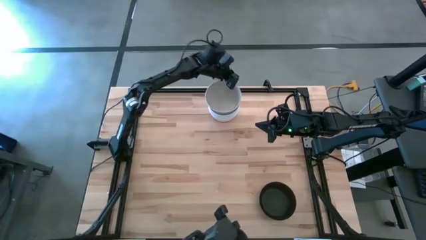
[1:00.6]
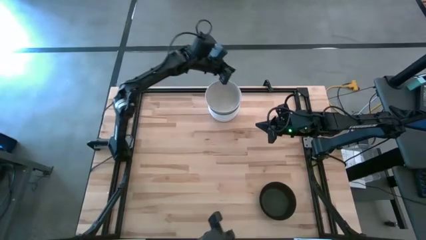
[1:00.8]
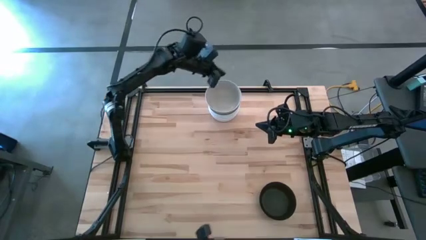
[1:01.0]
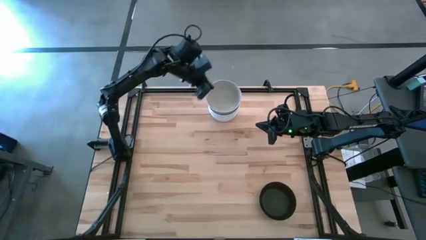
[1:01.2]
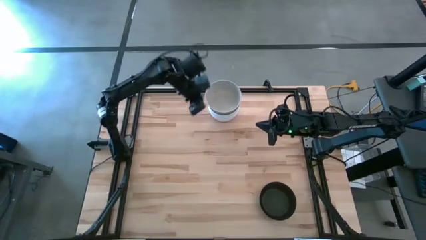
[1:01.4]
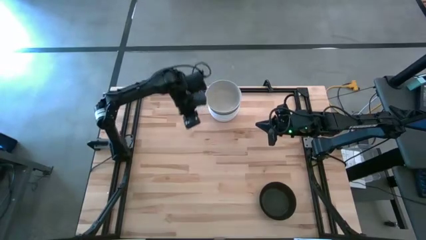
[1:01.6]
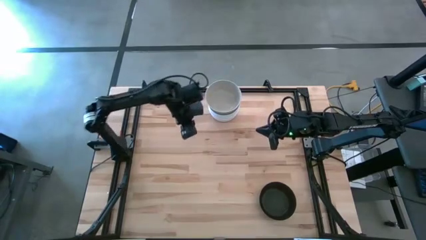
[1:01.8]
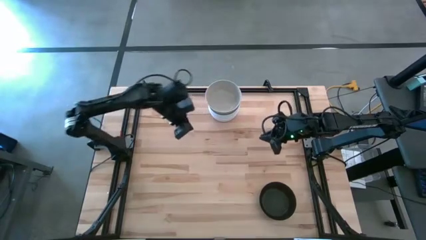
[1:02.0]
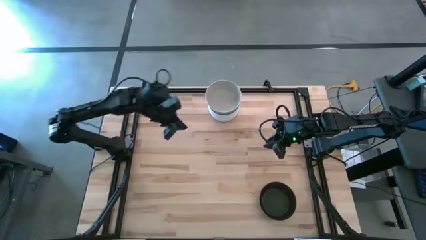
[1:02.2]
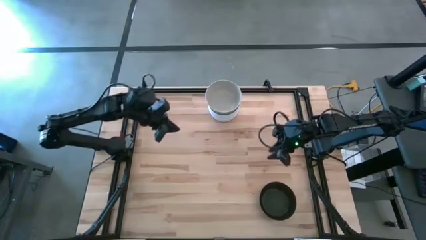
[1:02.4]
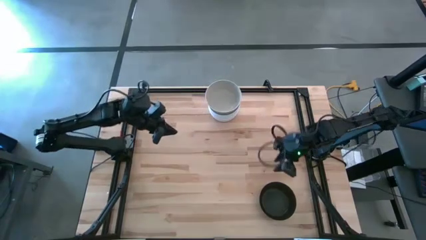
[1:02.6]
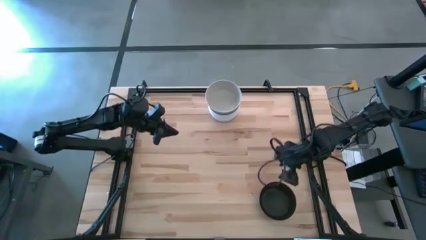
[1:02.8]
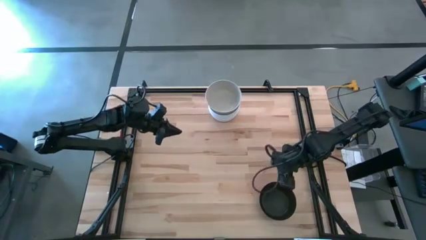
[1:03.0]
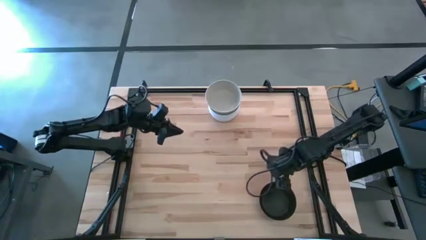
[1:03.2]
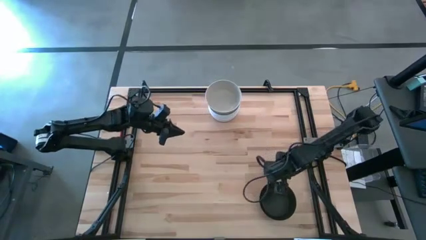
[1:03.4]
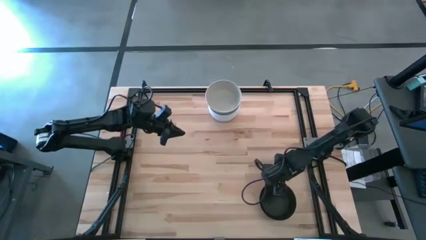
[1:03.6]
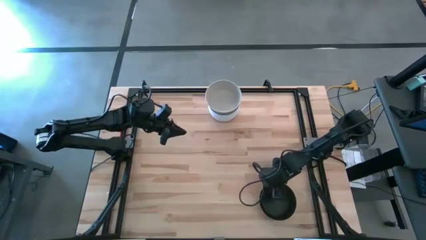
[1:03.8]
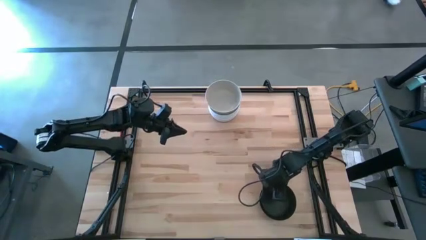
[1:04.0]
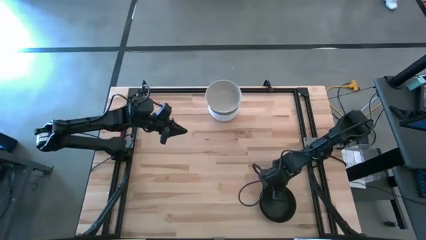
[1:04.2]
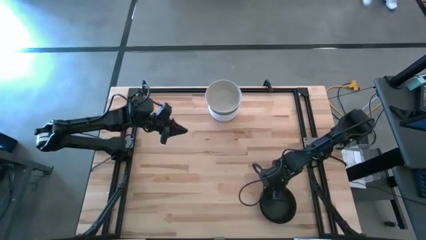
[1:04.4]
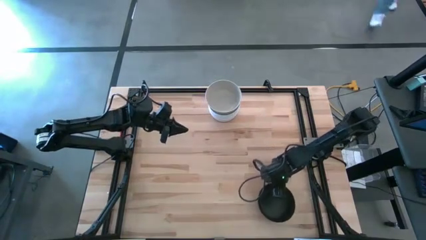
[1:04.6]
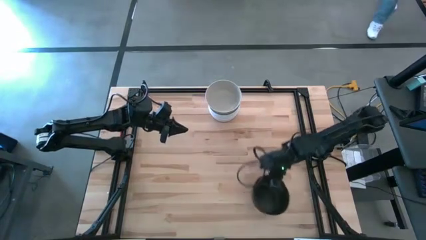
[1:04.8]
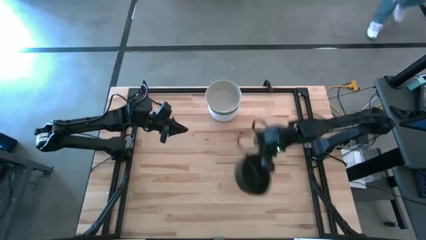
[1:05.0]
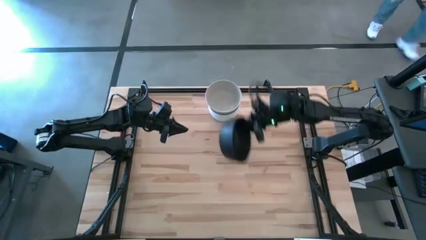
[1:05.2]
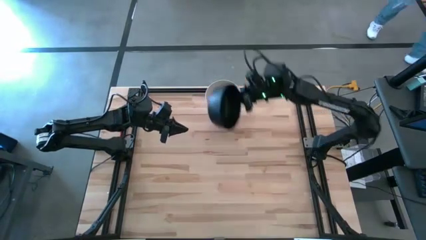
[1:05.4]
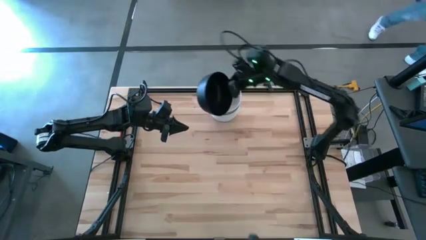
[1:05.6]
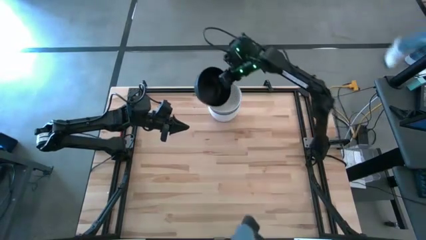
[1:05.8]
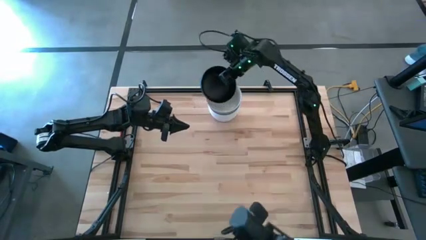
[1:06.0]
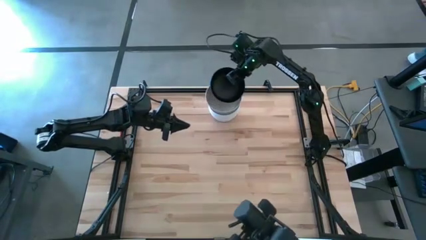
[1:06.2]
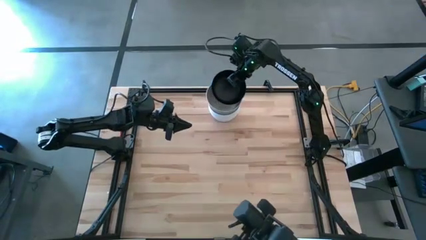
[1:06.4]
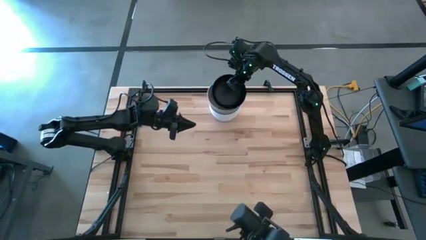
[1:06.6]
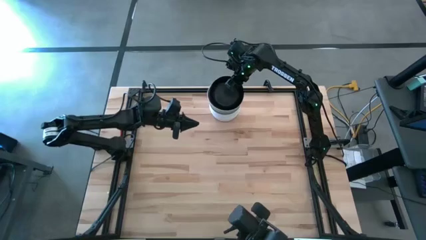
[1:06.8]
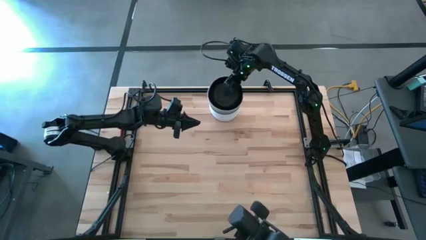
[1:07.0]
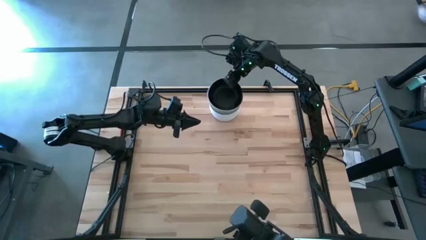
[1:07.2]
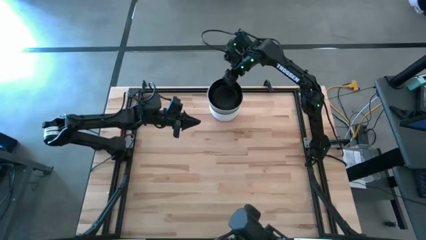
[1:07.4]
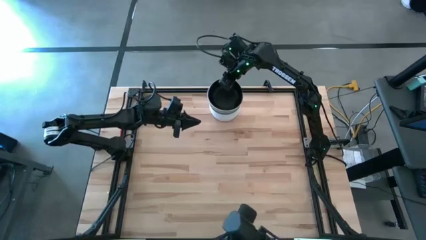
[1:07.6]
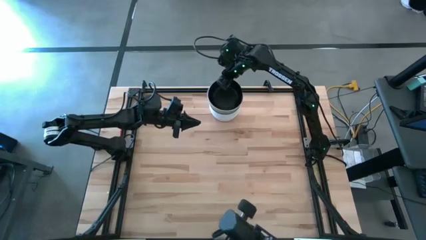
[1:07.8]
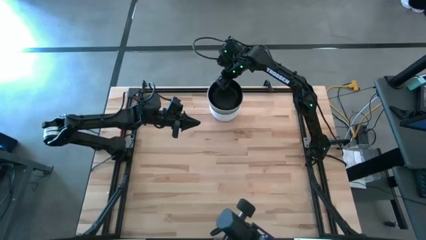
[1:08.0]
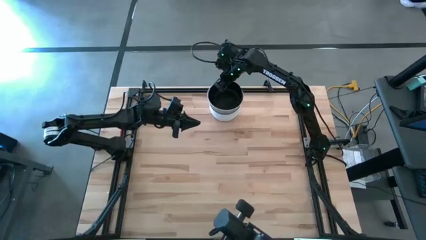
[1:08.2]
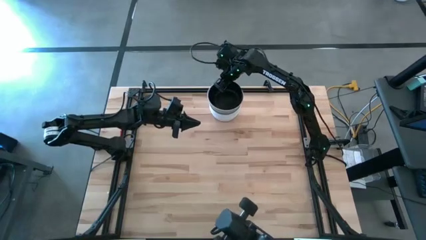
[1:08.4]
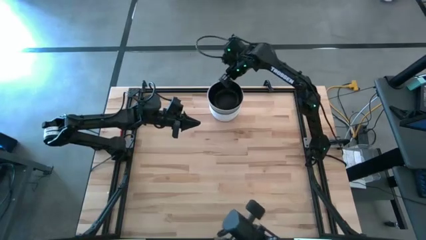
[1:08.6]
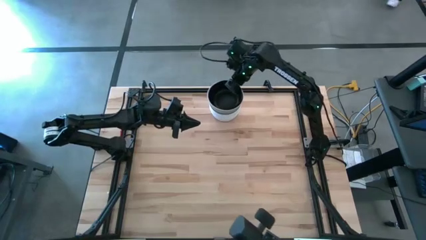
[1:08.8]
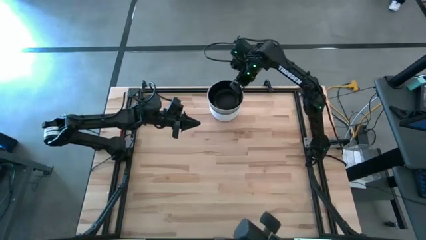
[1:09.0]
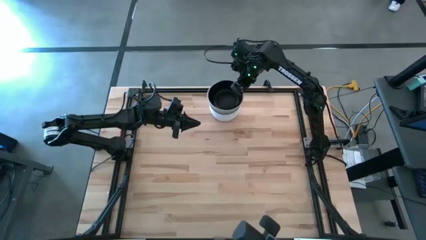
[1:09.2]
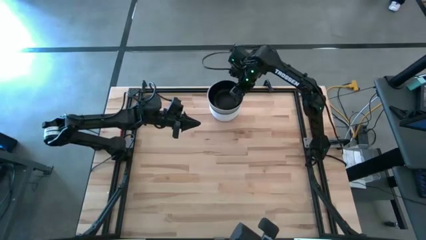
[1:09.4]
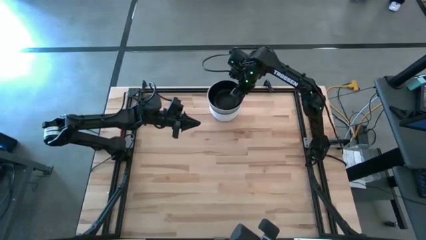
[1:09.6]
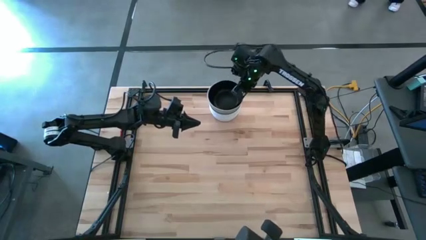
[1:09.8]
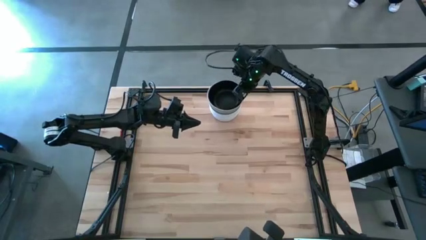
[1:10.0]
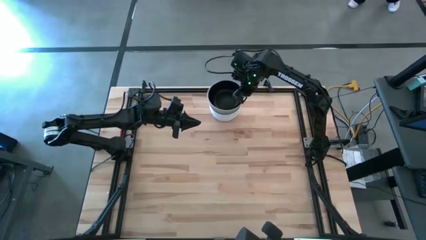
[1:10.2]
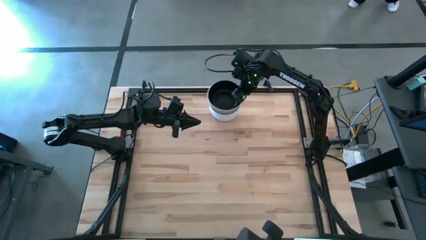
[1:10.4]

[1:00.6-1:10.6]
Task: Nest bowls inside each other
Stack the black bowl on the stacked gray bowl

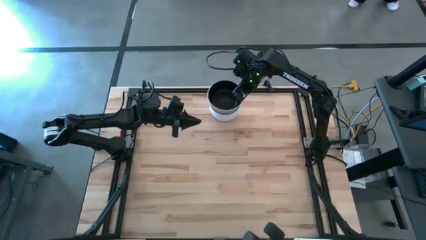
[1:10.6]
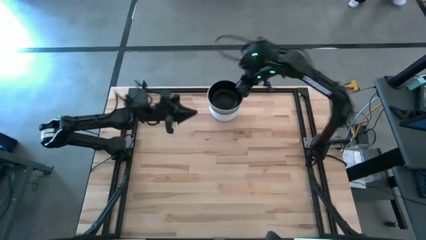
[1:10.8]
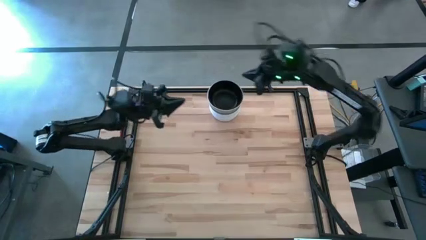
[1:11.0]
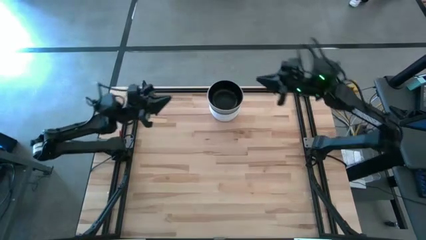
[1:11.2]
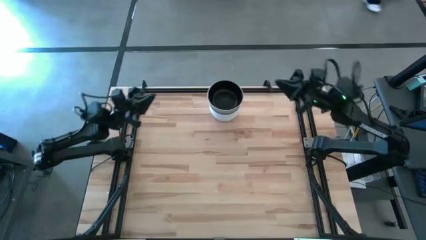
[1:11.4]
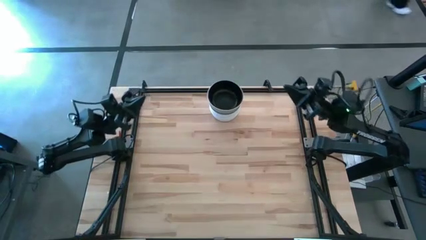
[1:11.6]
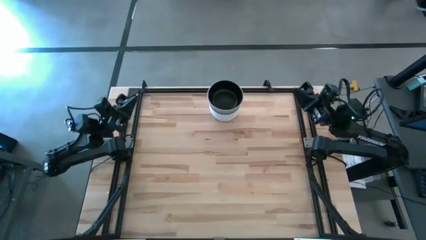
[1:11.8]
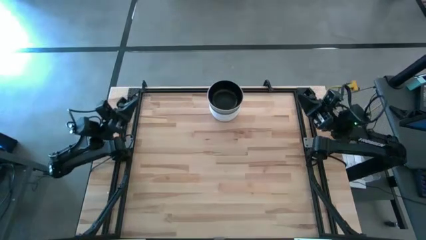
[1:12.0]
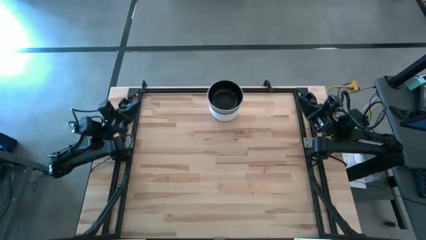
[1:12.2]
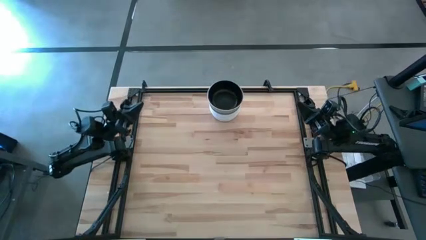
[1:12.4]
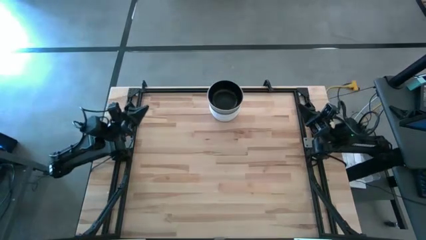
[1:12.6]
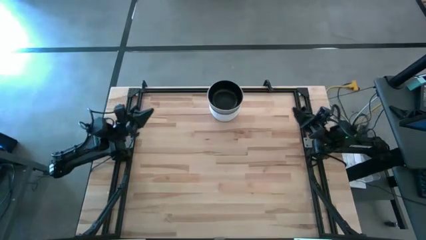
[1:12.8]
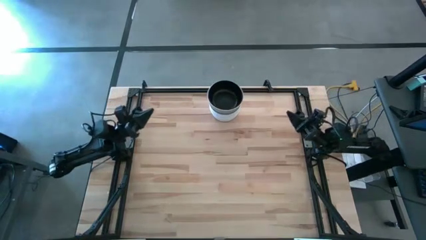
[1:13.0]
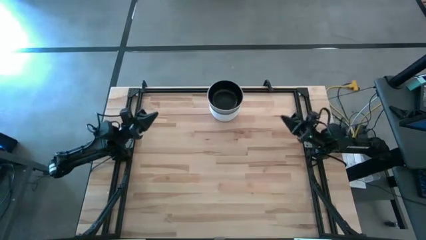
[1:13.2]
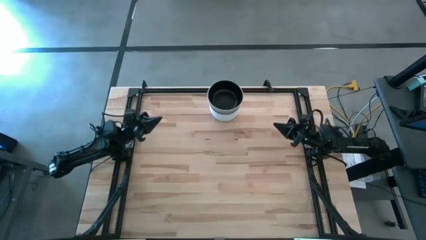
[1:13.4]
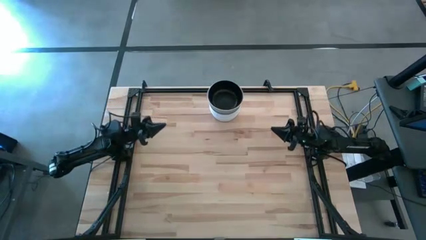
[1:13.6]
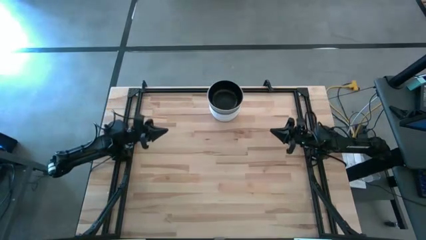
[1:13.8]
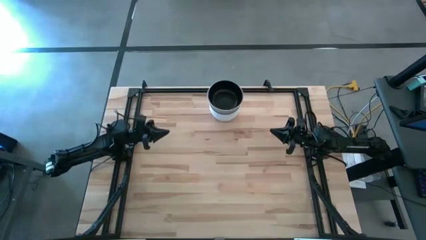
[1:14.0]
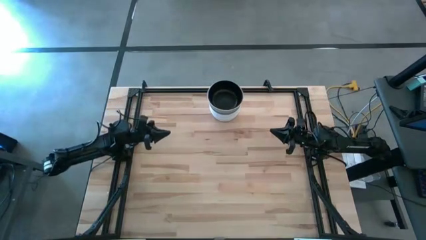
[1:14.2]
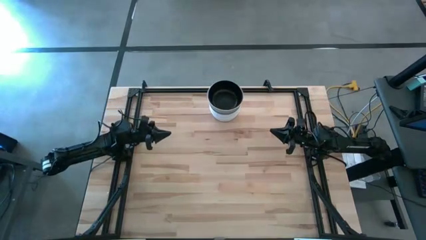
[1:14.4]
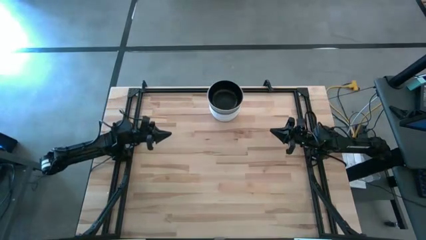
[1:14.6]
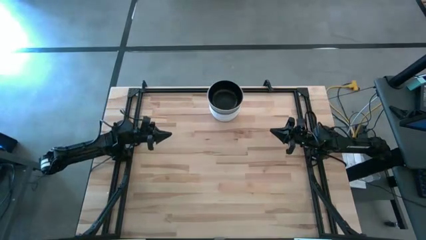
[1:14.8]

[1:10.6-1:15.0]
Return to Home Position
